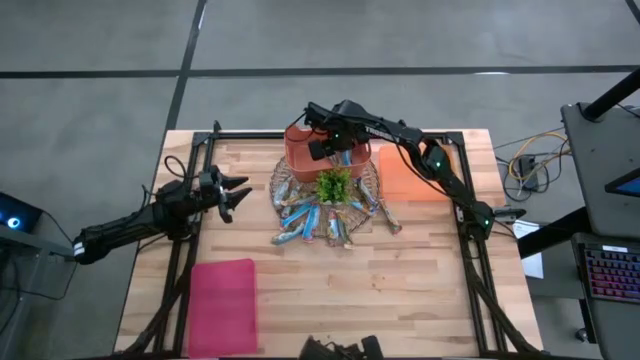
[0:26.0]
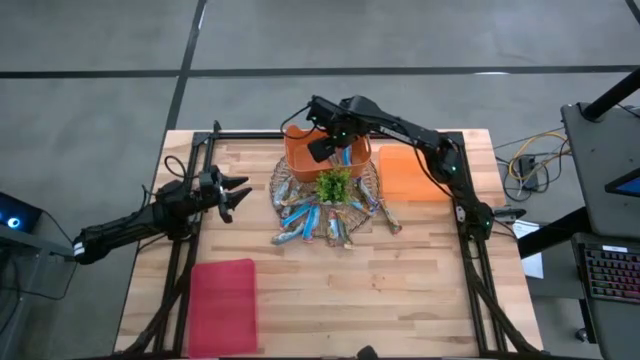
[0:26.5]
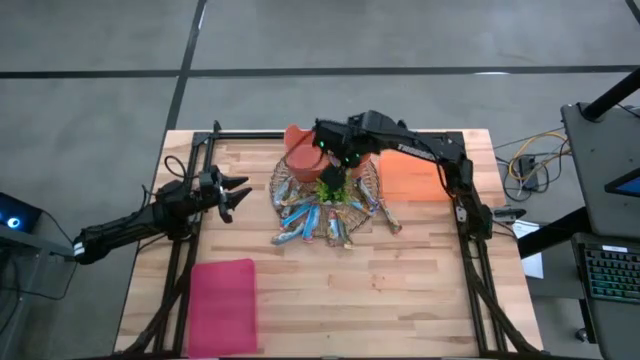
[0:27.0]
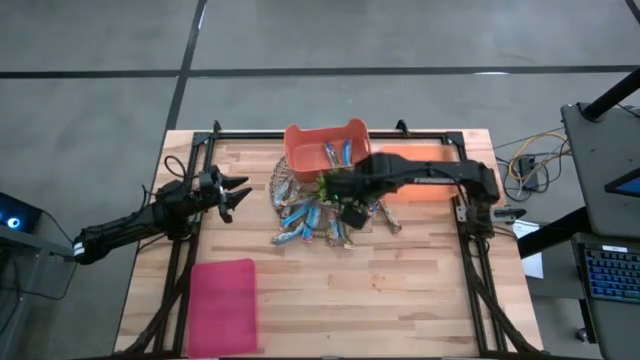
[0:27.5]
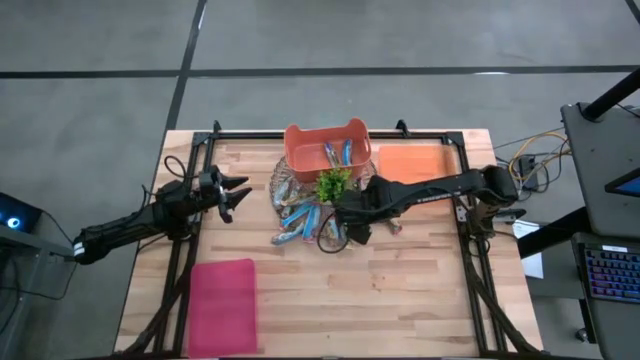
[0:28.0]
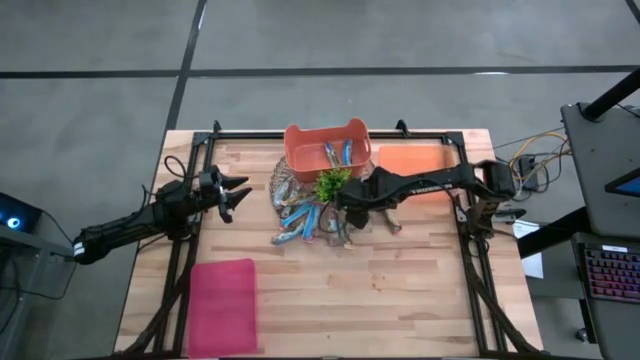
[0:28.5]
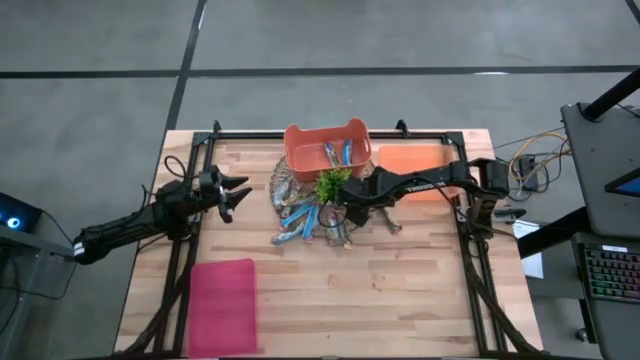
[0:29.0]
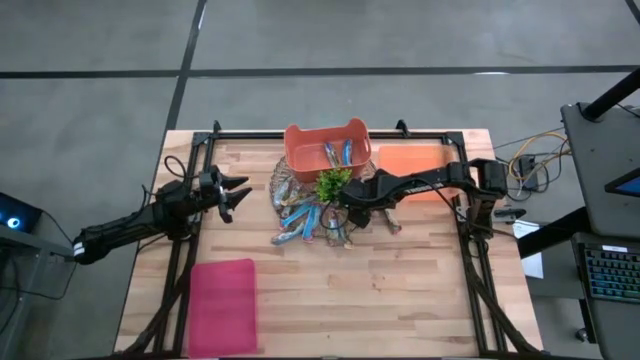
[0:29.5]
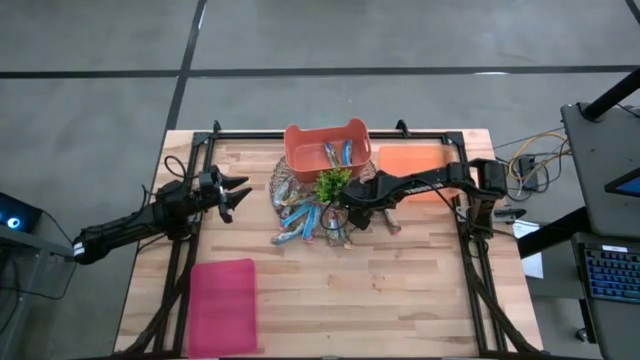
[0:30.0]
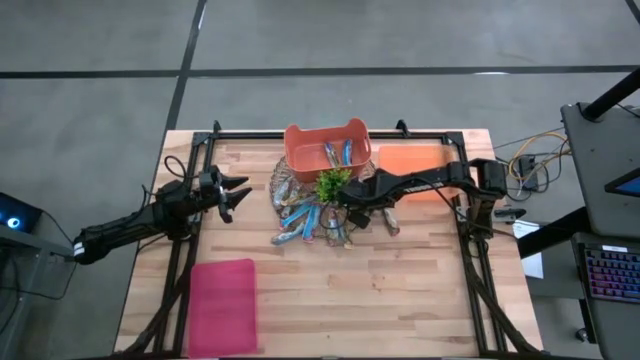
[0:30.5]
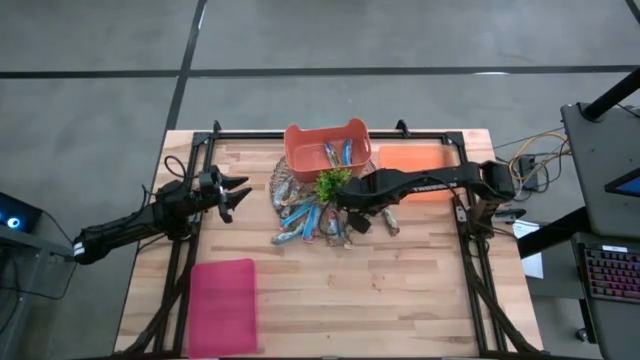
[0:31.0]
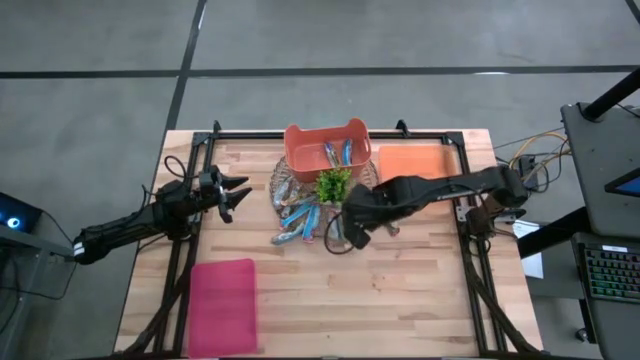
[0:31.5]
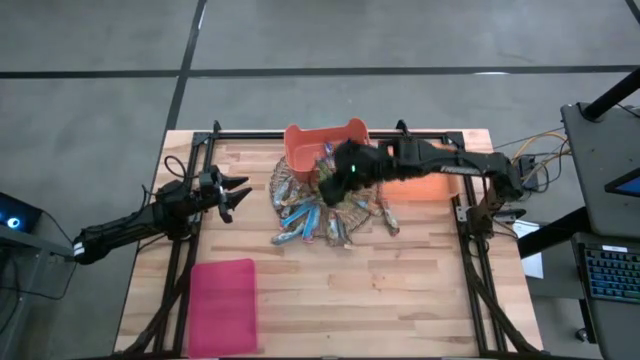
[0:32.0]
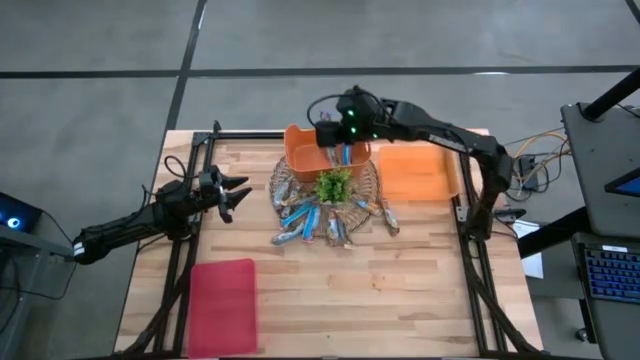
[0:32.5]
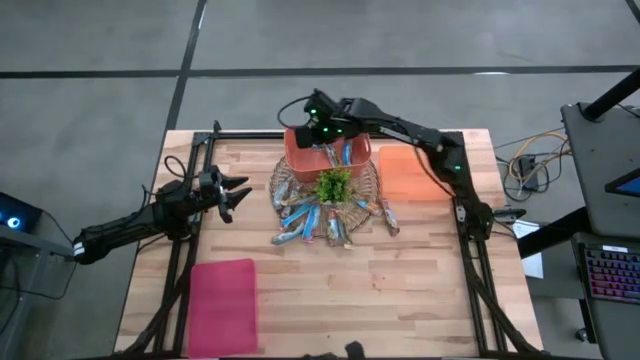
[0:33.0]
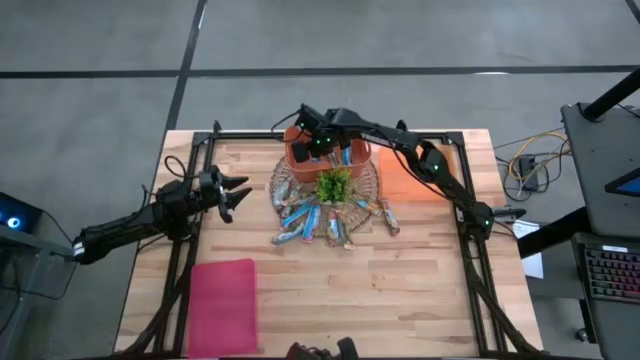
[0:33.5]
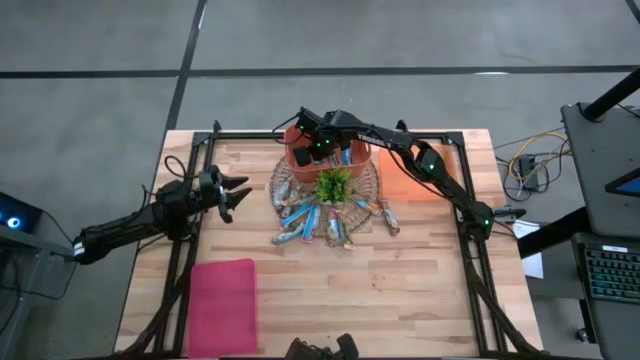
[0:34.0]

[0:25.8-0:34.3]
Task: Pick and place Granola Bars by type
Put the blue granola bar into the dark orange bin

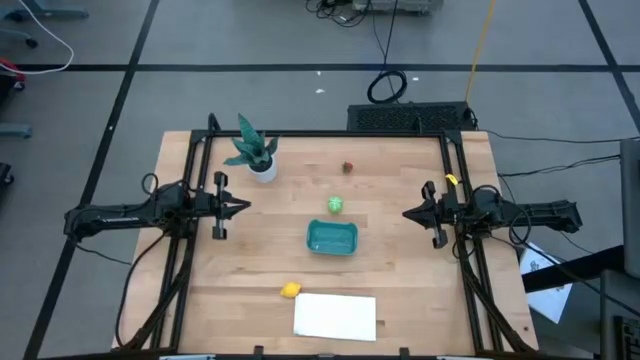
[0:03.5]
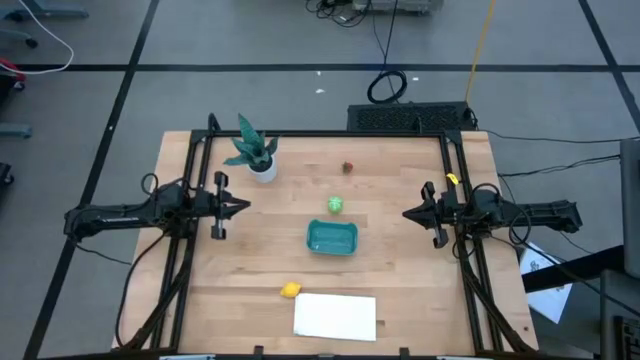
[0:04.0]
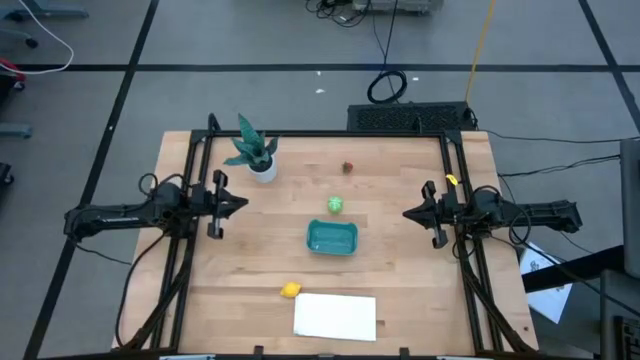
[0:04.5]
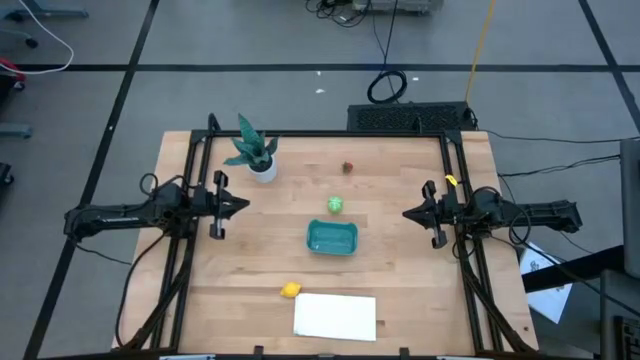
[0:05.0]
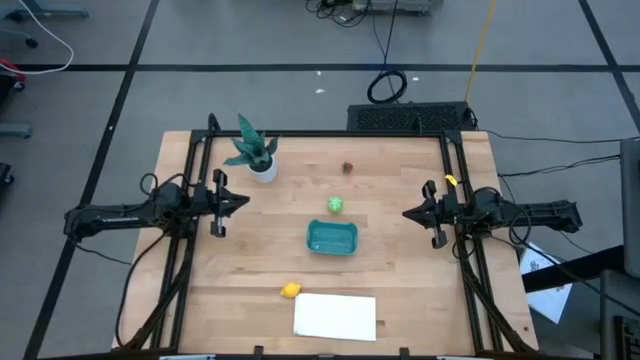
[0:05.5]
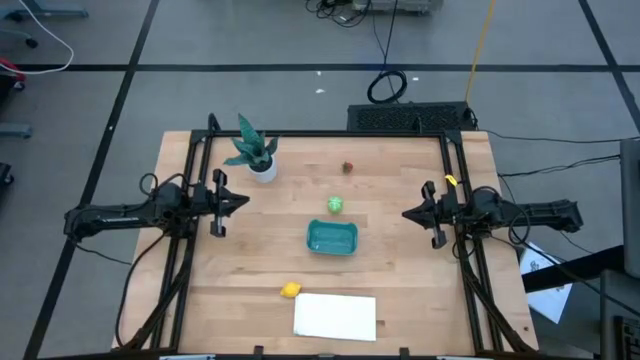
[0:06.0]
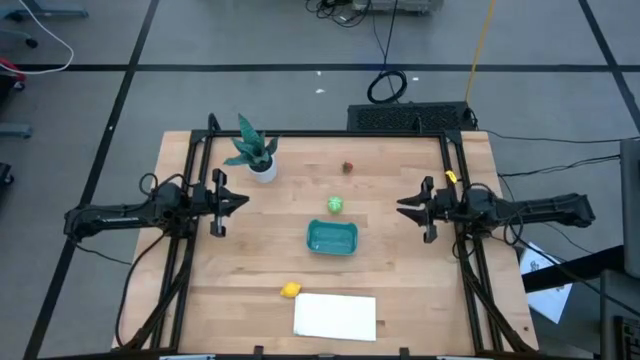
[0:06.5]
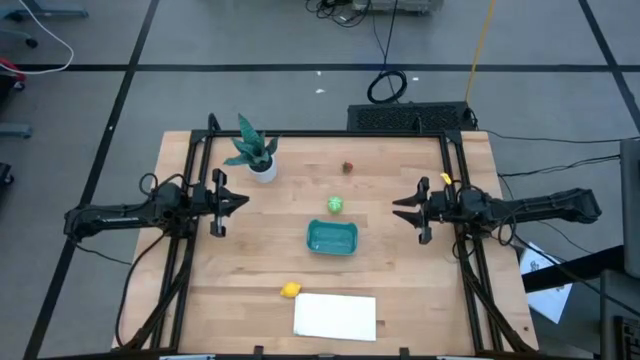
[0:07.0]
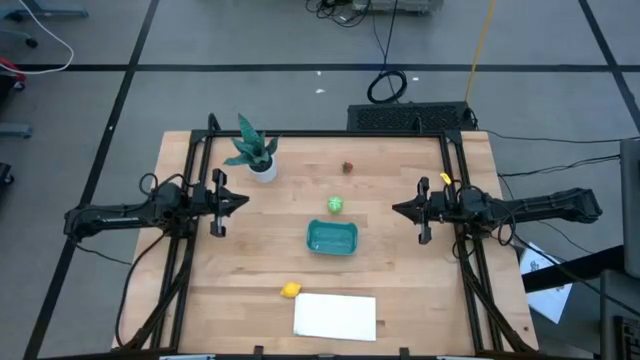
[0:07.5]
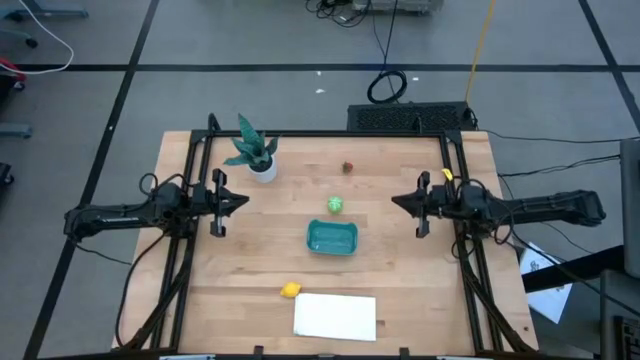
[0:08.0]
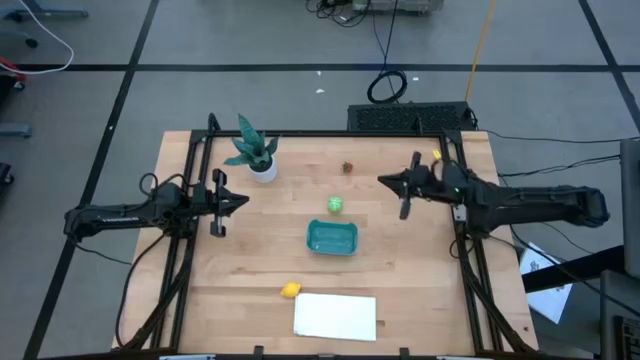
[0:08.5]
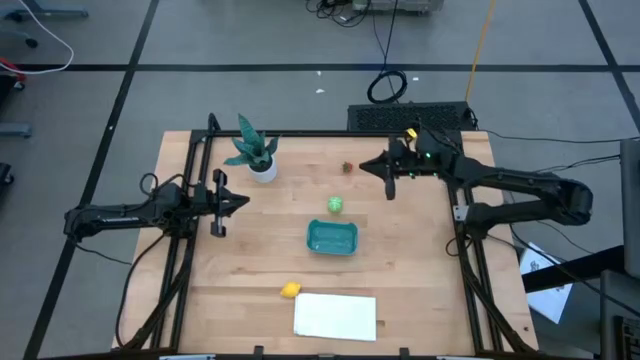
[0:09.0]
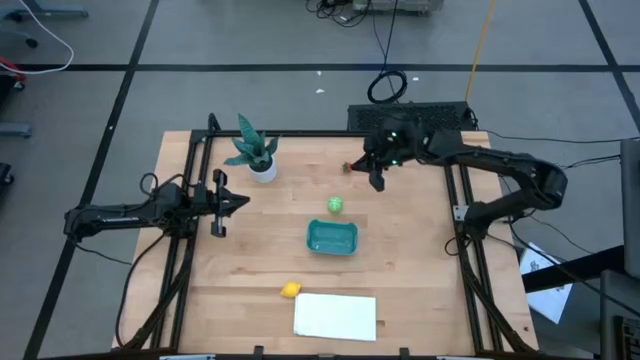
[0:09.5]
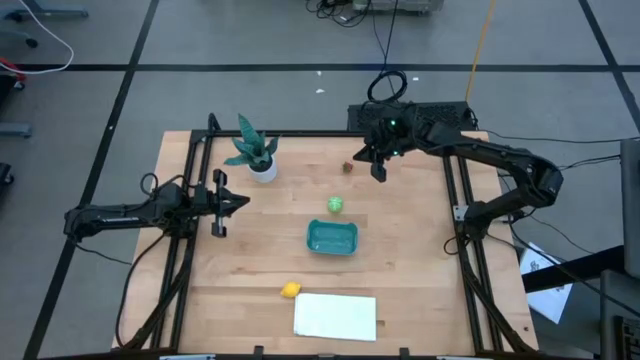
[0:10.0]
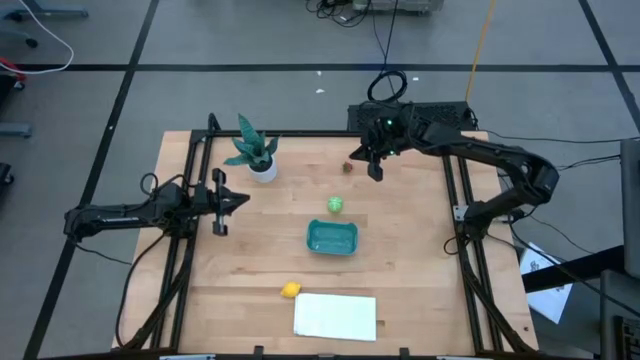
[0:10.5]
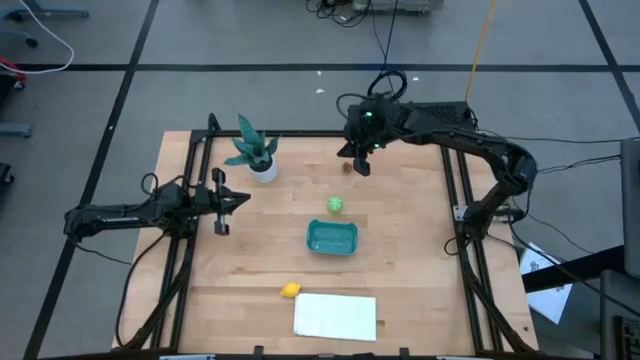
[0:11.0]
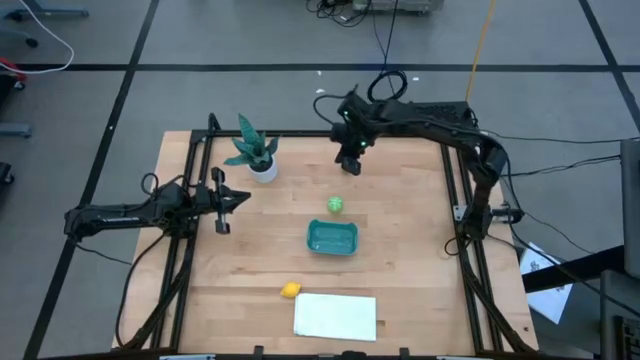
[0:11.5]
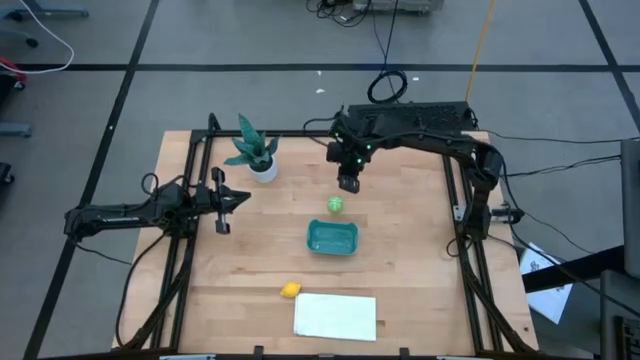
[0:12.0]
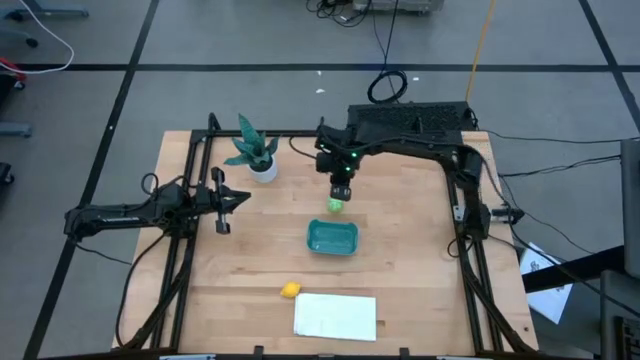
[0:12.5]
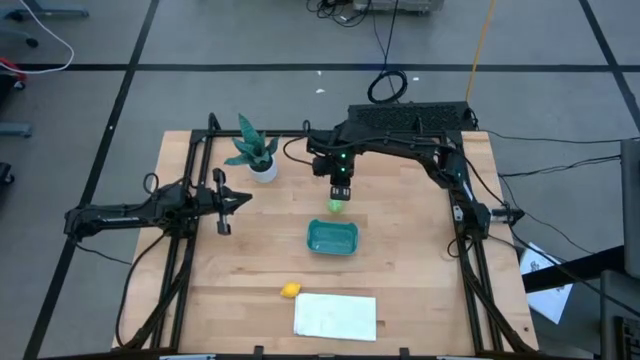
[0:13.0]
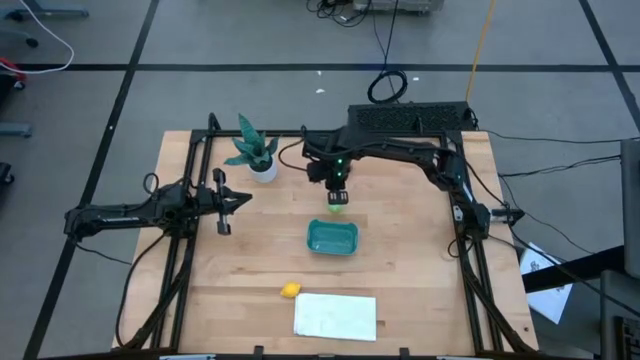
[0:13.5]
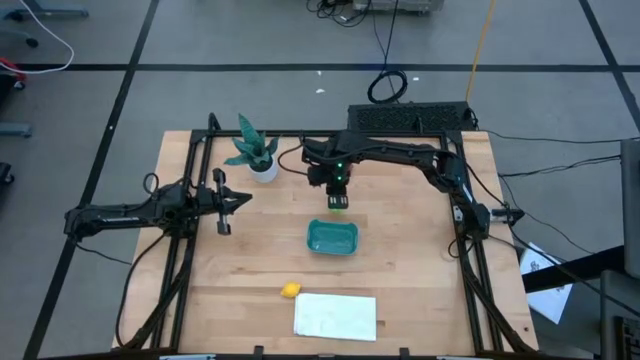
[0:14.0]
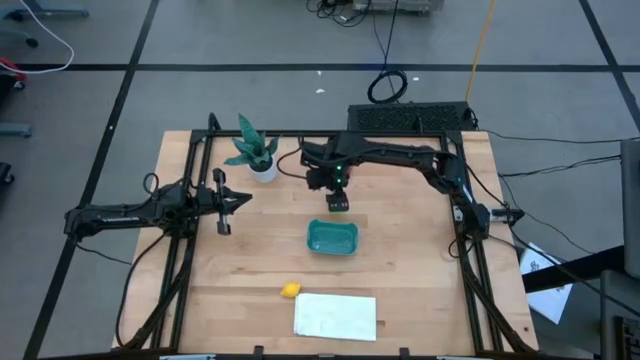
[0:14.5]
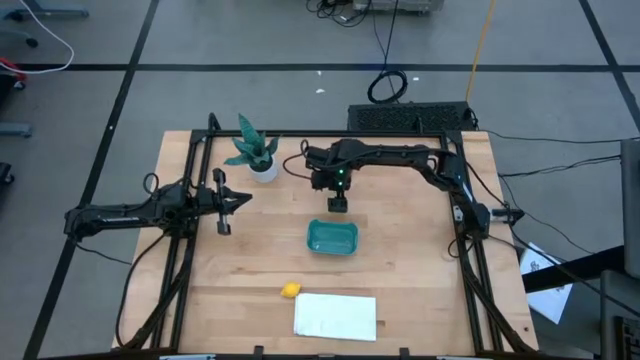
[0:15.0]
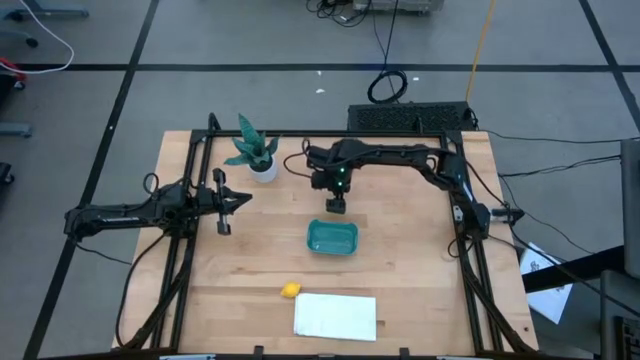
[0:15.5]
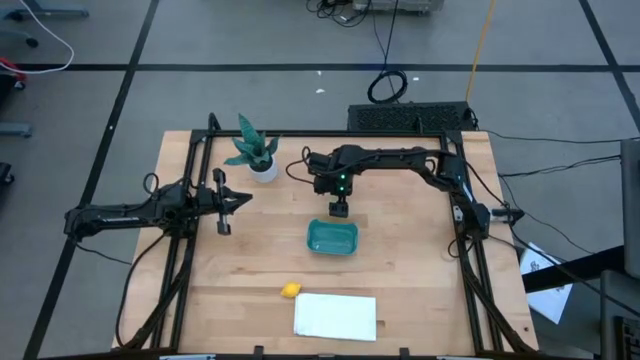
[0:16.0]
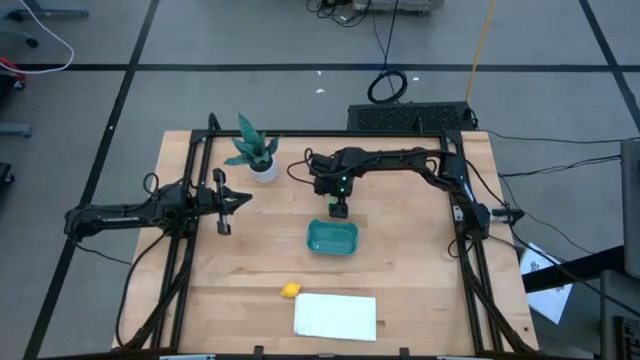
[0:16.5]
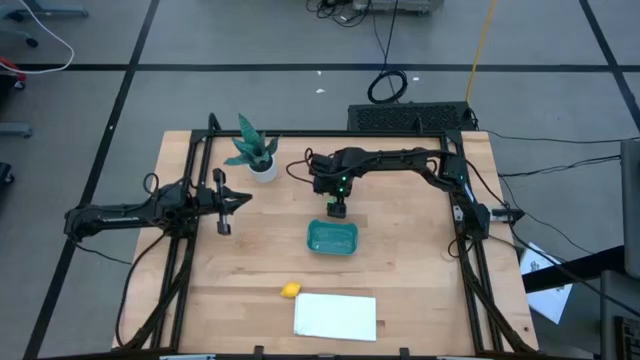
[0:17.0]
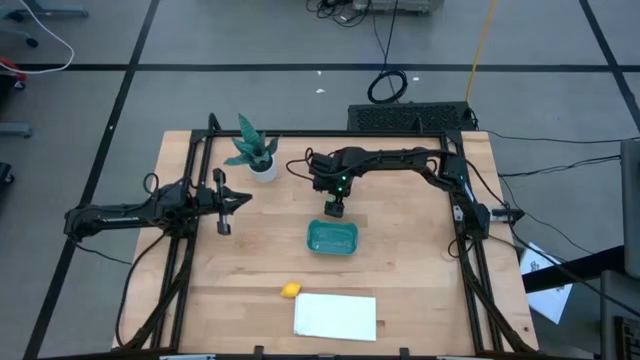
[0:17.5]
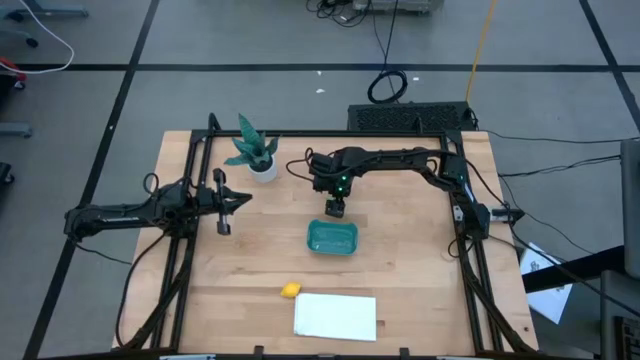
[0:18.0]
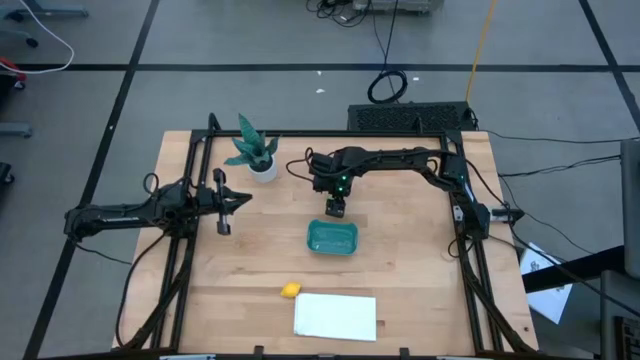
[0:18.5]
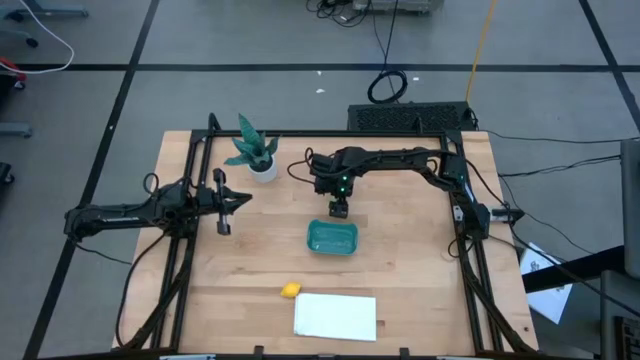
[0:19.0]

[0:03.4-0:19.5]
Task: Pick and placing Produce into tupperware
Put the green cabbage into the blue bin
